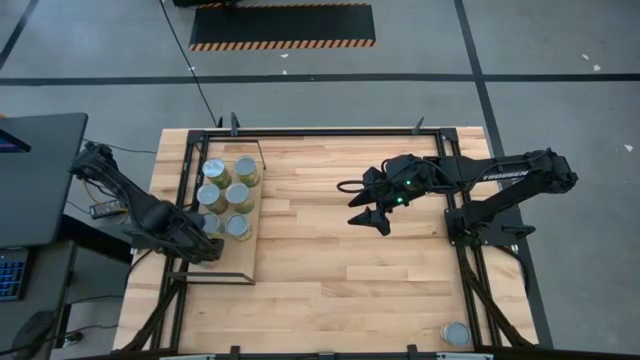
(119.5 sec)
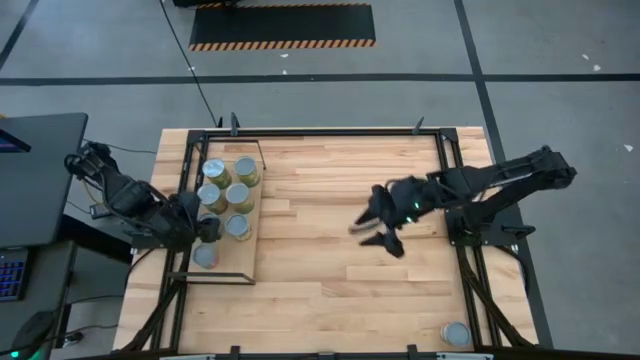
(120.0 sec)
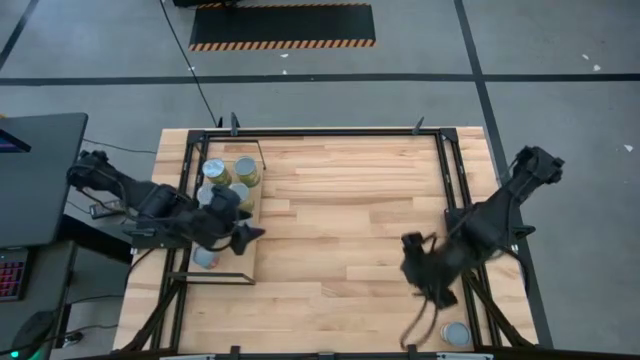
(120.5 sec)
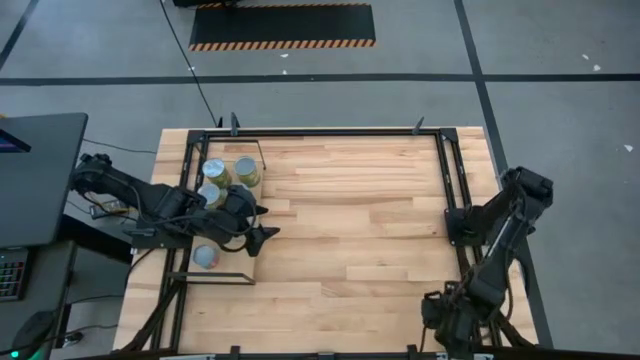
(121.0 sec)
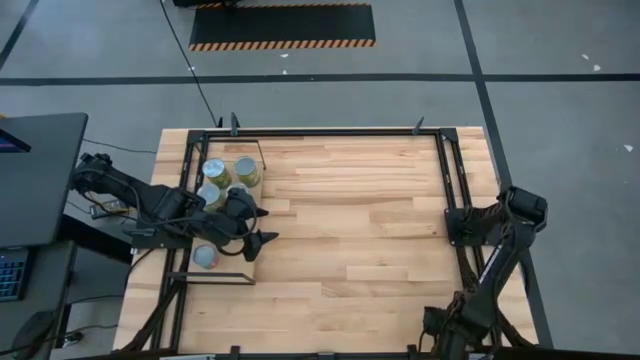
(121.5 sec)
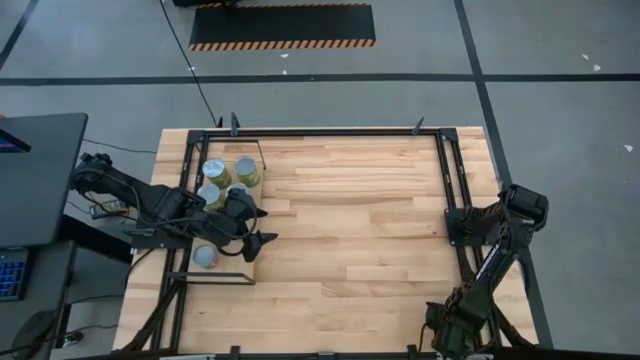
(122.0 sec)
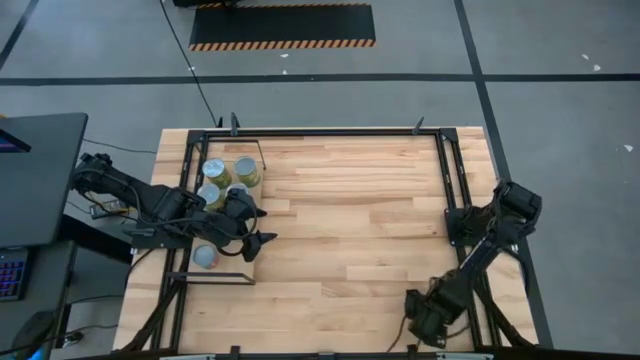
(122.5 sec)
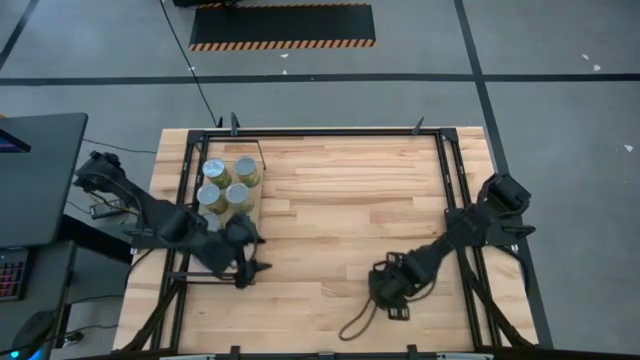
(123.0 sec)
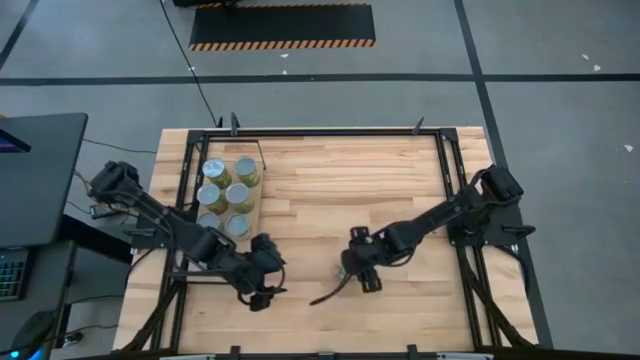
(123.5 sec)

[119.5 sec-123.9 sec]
Task: Pick and place cans onto a shelf
Put the small canned oranges on the shelf

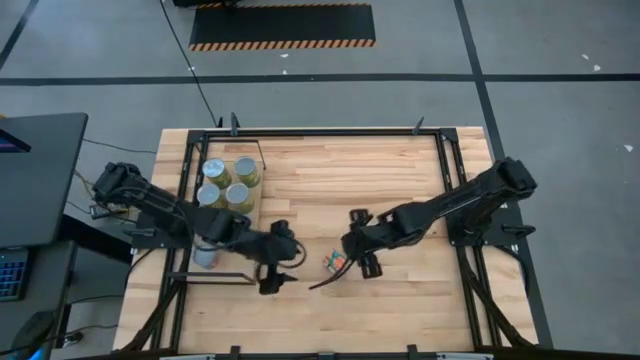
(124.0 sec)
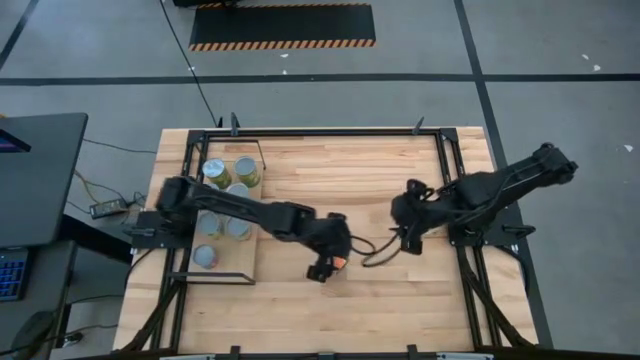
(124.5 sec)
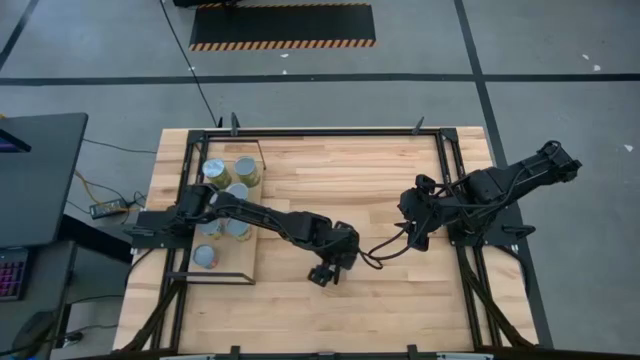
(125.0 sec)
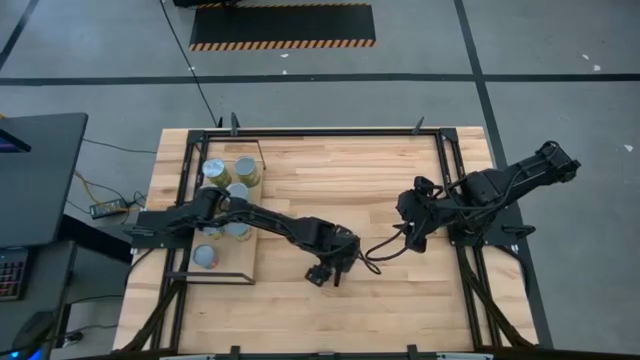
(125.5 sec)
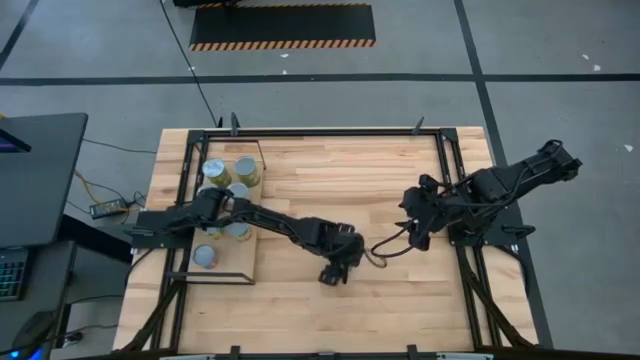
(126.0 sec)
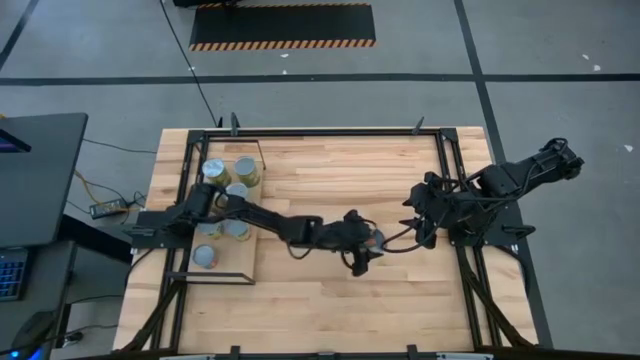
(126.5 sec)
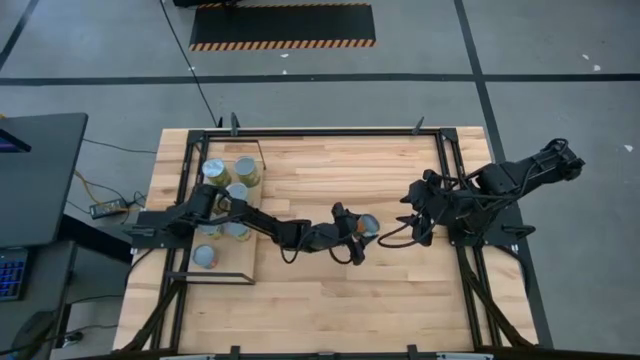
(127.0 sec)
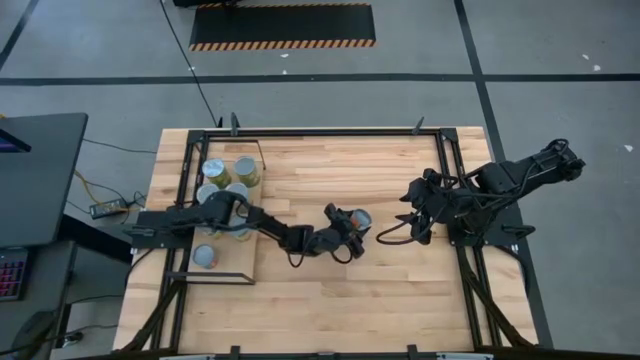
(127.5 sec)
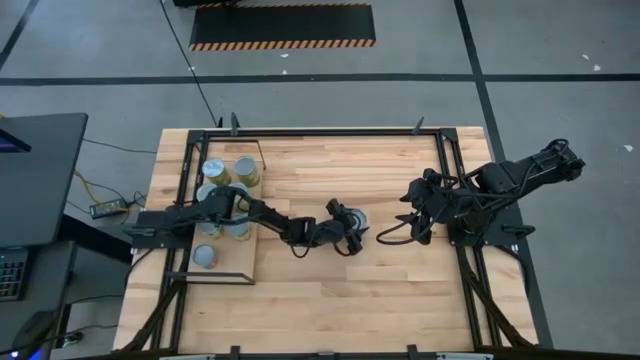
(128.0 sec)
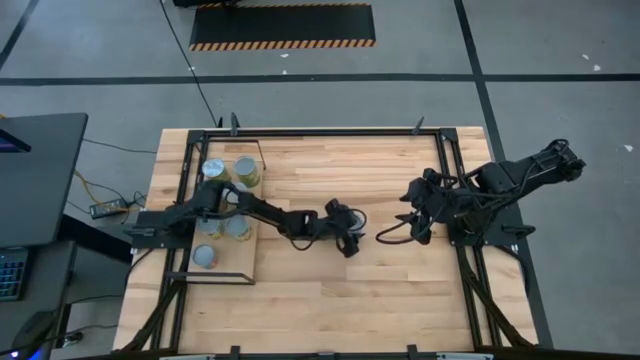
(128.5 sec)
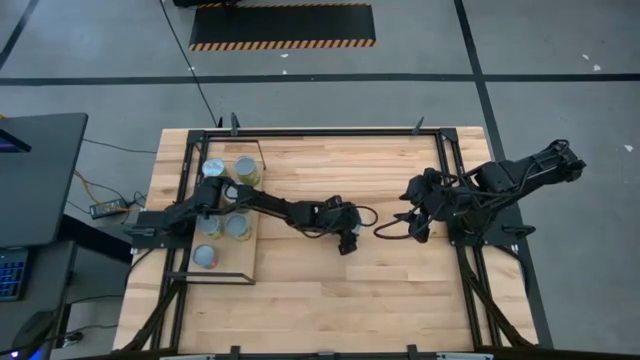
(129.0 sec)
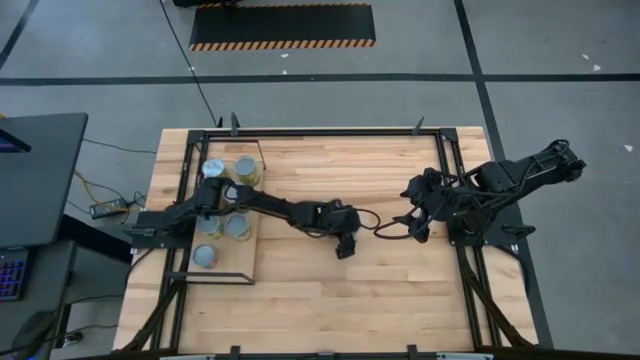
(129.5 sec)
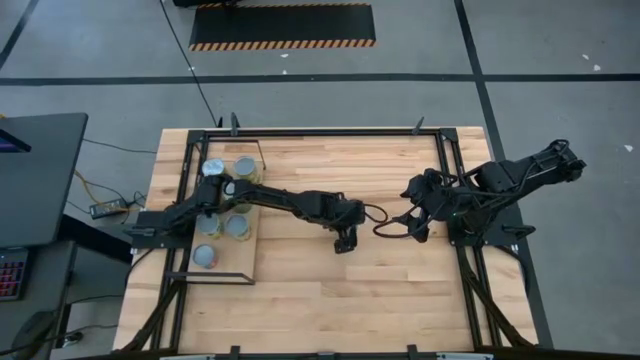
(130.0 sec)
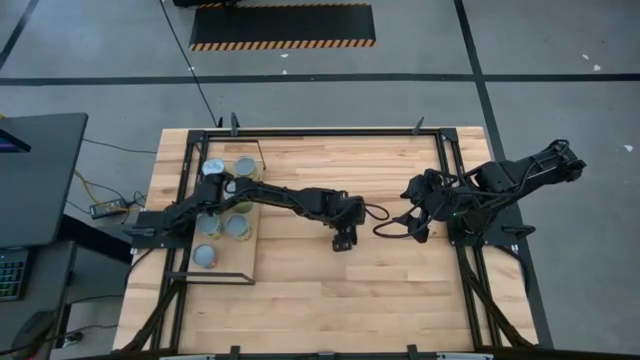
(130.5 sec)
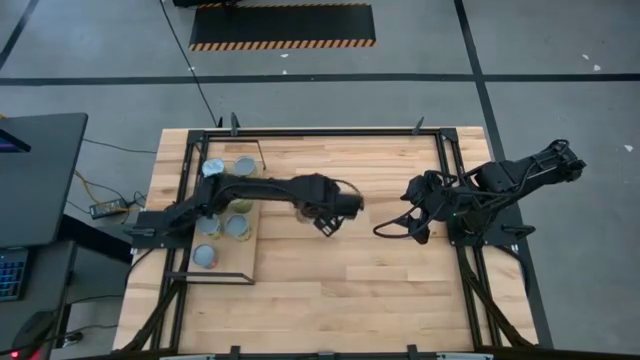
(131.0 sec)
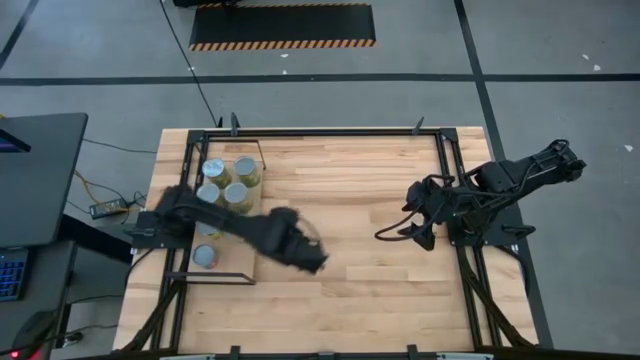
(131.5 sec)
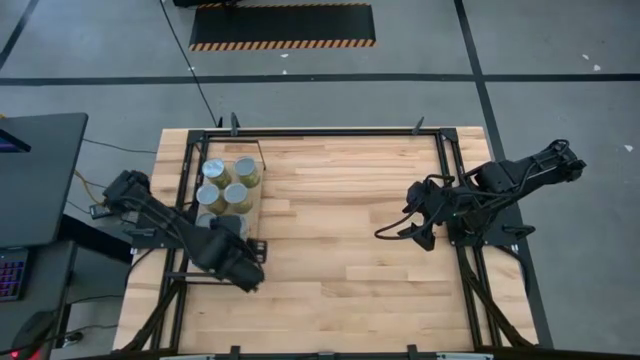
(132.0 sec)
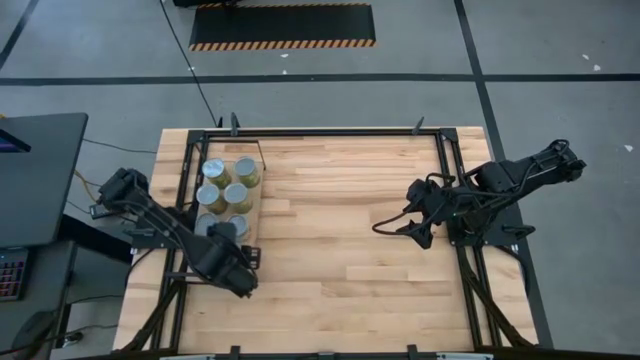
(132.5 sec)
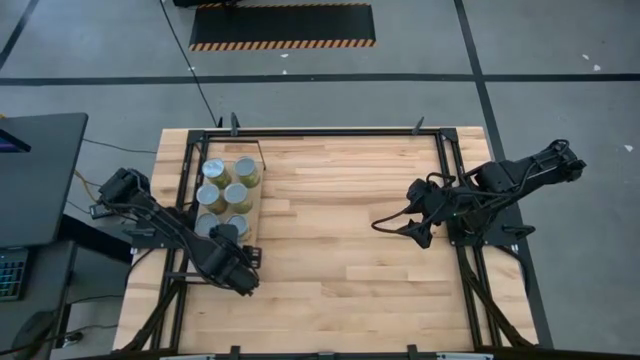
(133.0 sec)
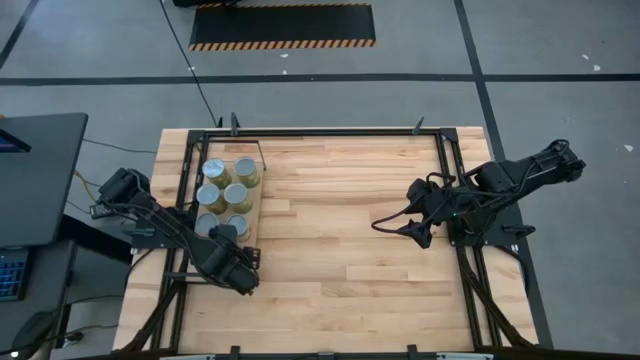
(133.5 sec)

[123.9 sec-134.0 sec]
Put the small canned oranges on the shelf

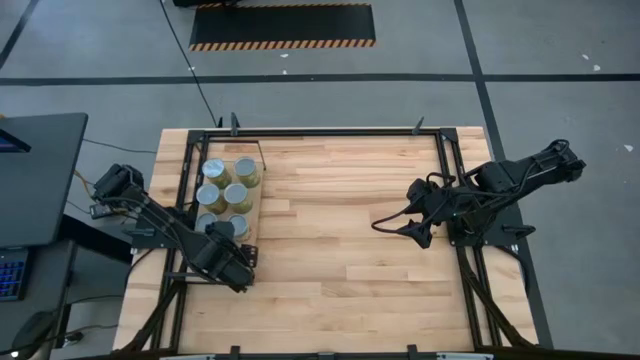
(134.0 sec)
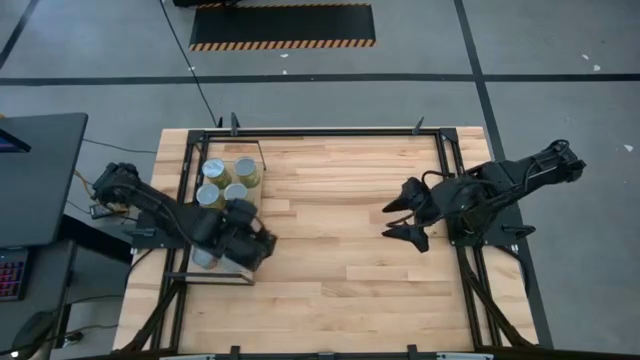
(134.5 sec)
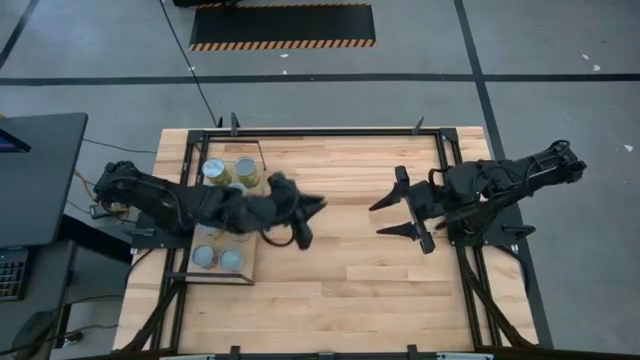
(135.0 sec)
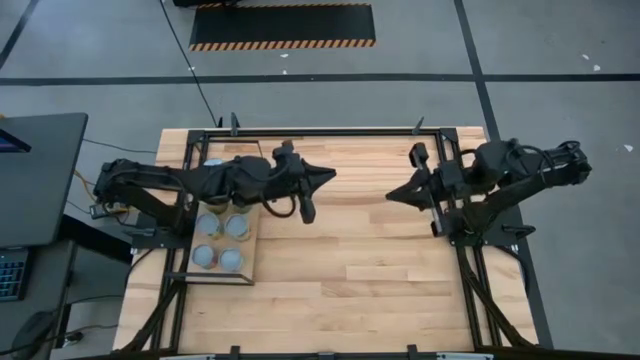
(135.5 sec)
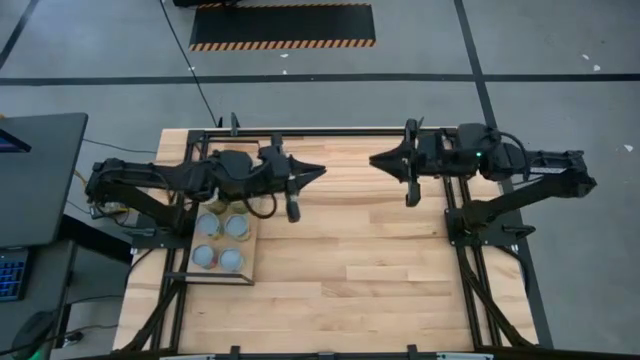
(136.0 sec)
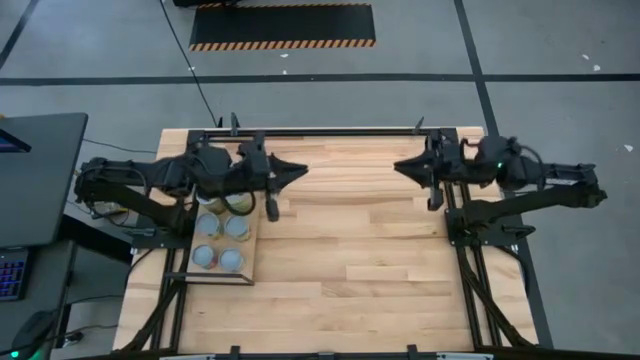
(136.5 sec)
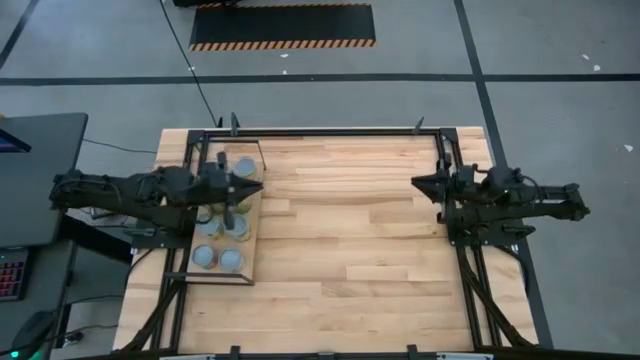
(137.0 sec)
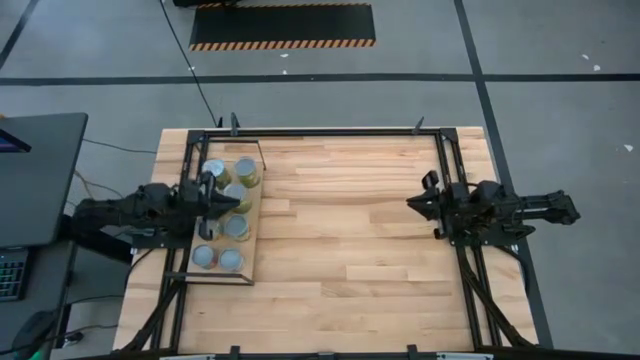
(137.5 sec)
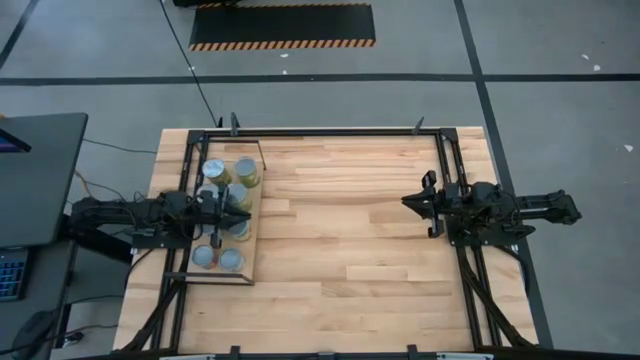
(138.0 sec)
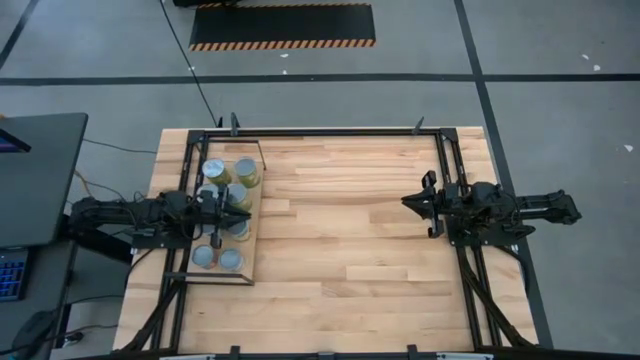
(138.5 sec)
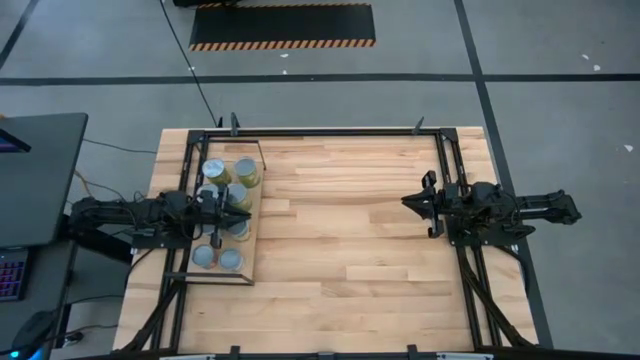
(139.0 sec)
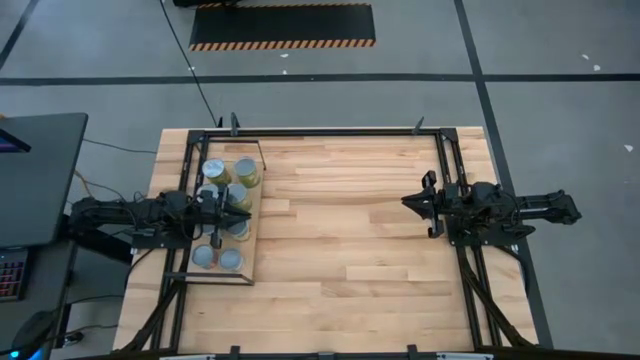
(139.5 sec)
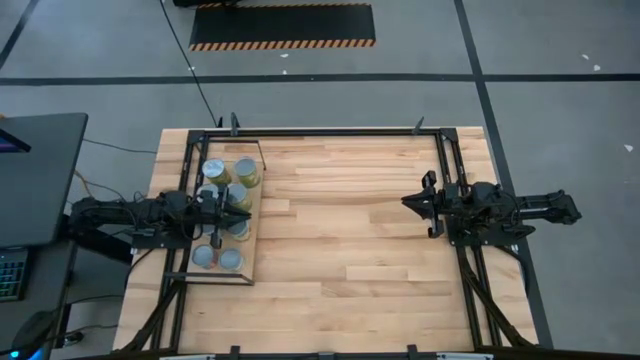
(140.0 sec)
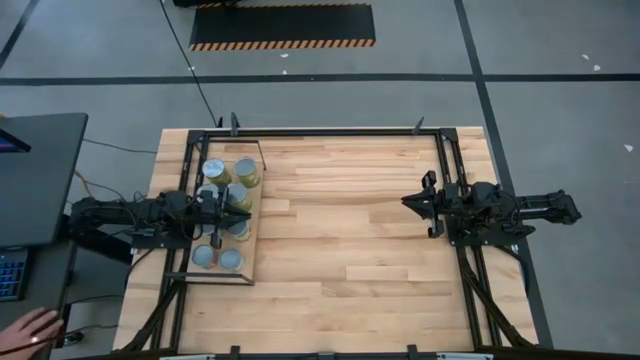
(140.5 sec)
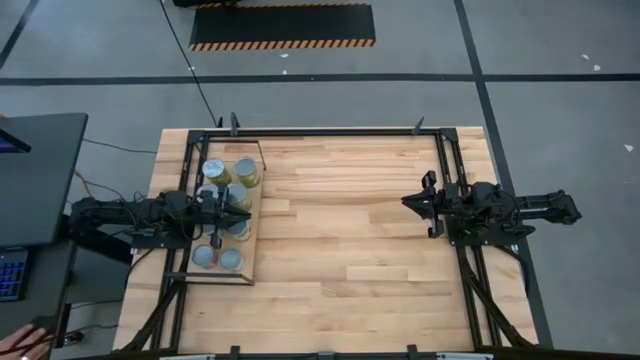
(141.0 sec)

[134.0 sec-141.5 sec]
Return to Home Position
